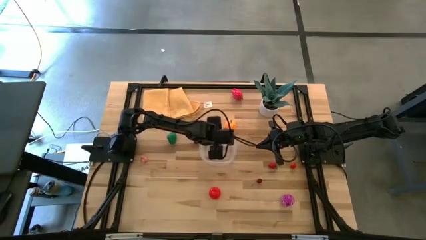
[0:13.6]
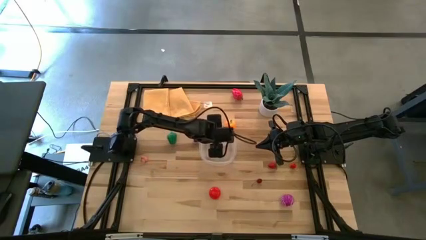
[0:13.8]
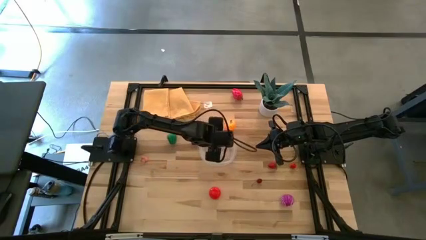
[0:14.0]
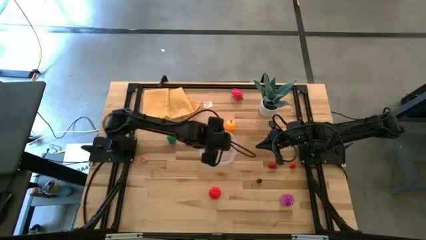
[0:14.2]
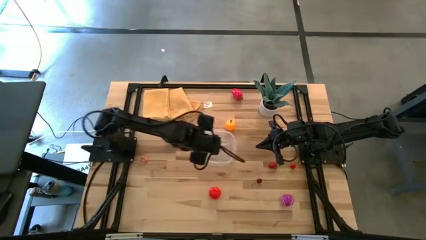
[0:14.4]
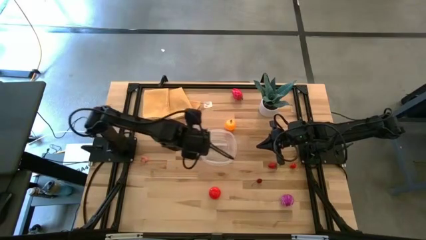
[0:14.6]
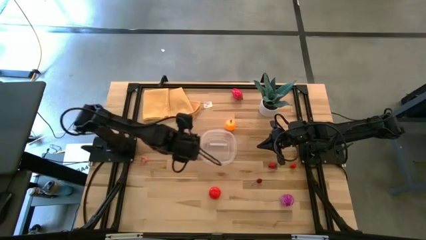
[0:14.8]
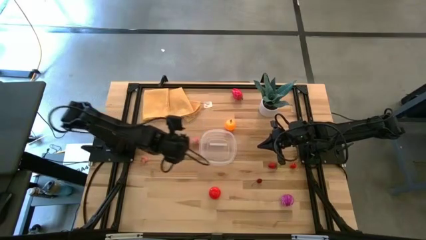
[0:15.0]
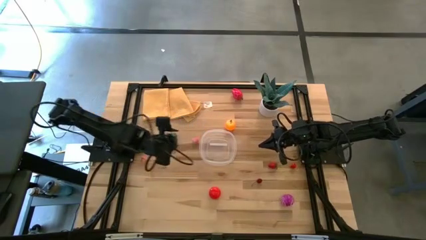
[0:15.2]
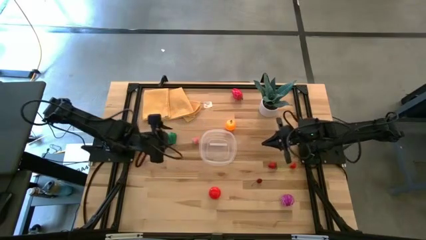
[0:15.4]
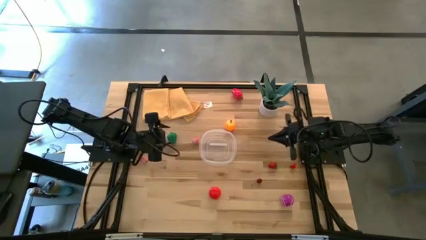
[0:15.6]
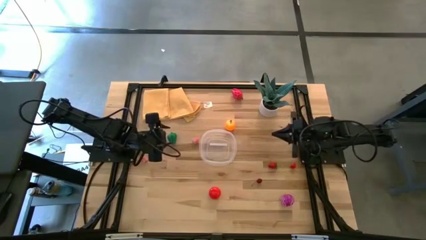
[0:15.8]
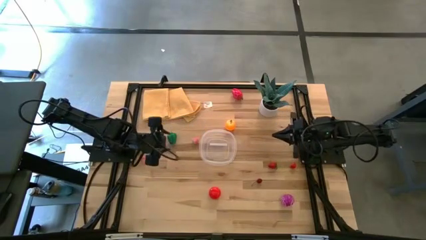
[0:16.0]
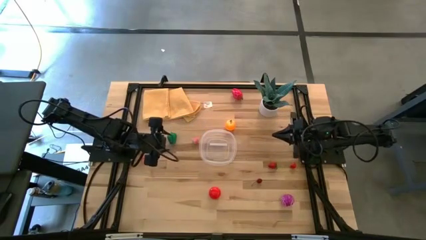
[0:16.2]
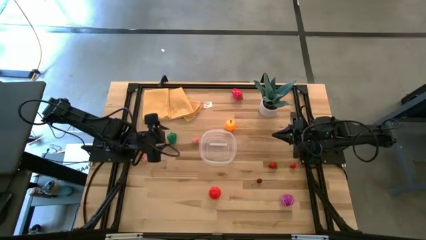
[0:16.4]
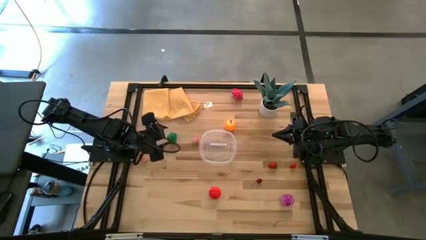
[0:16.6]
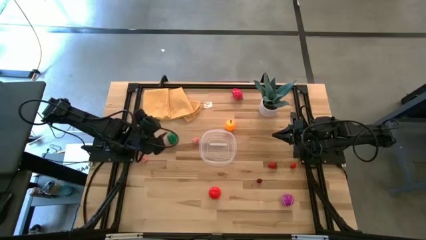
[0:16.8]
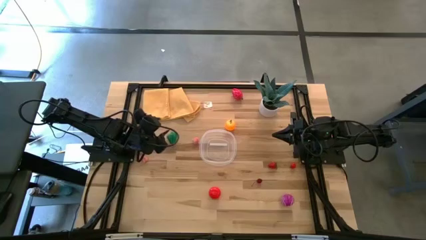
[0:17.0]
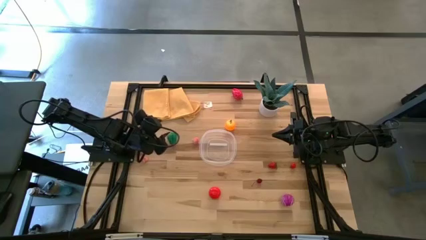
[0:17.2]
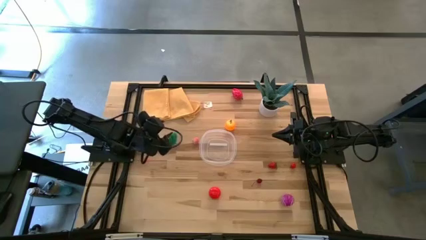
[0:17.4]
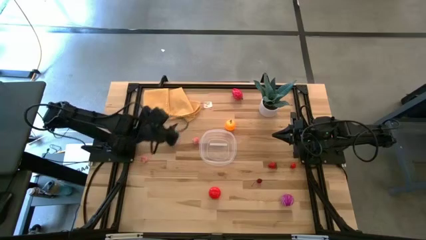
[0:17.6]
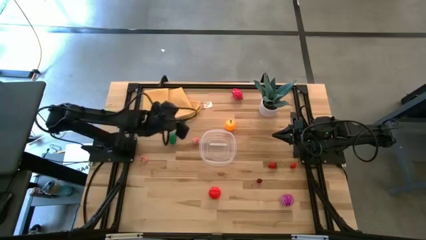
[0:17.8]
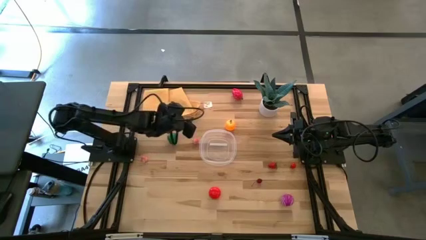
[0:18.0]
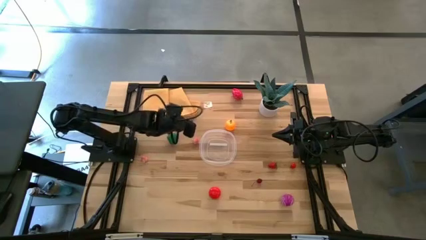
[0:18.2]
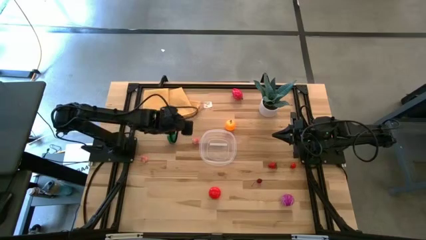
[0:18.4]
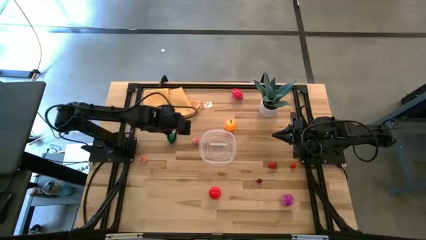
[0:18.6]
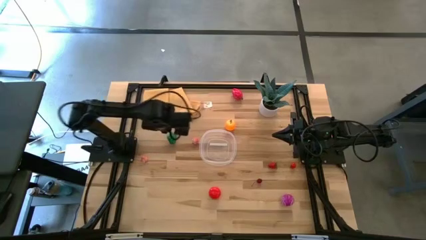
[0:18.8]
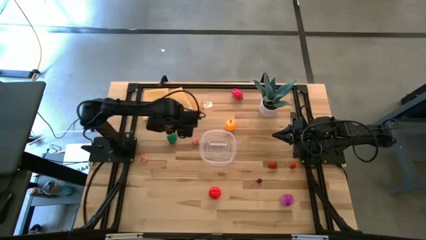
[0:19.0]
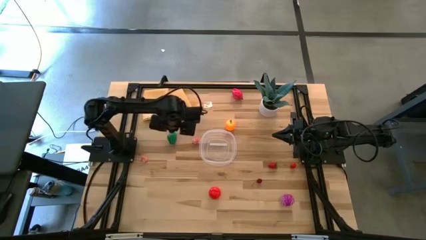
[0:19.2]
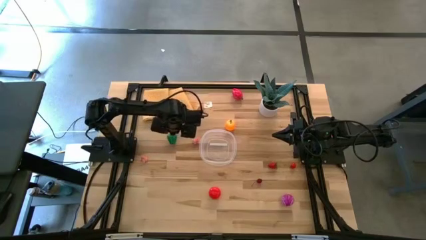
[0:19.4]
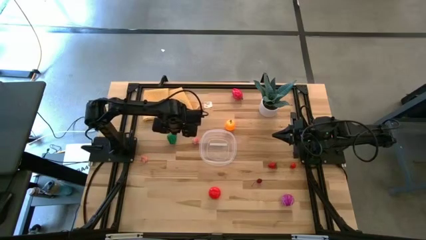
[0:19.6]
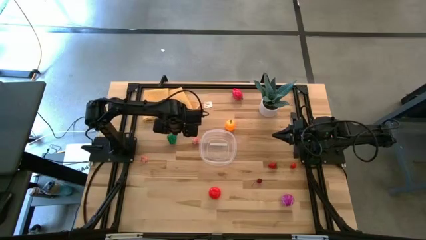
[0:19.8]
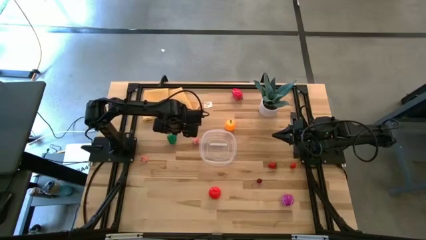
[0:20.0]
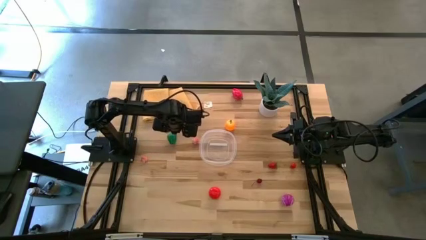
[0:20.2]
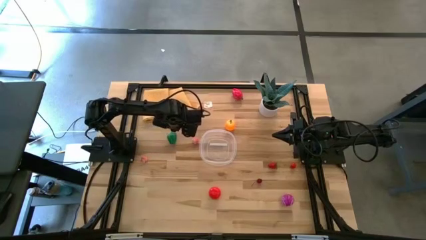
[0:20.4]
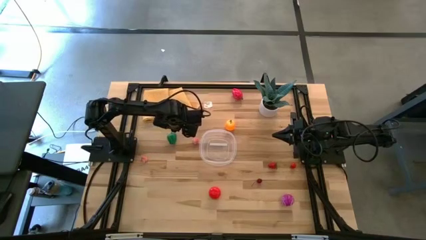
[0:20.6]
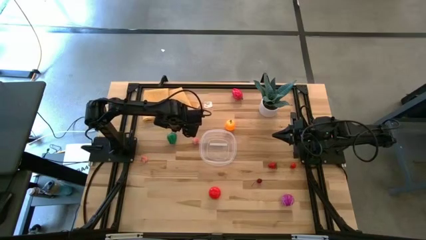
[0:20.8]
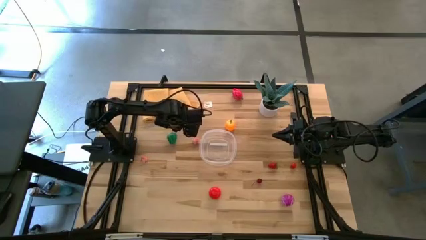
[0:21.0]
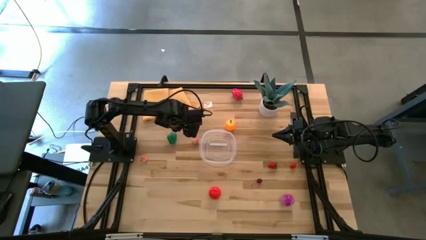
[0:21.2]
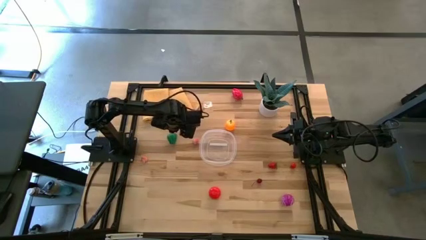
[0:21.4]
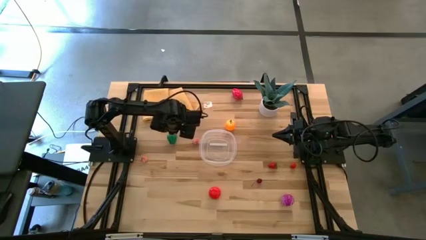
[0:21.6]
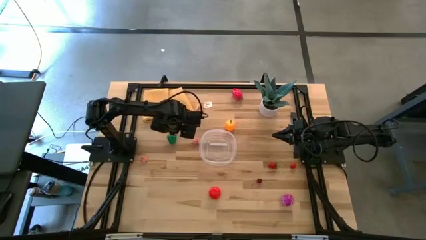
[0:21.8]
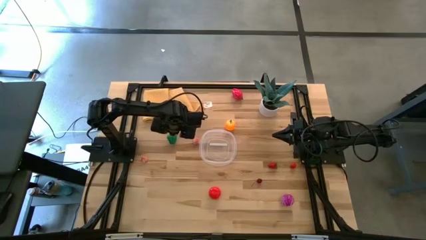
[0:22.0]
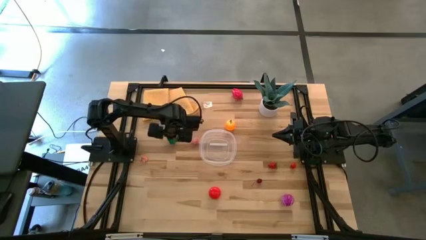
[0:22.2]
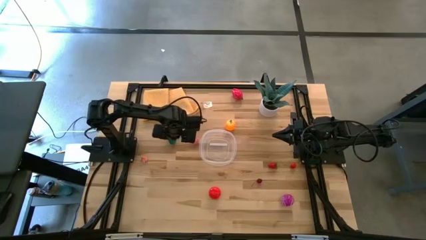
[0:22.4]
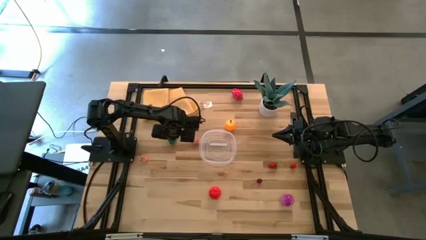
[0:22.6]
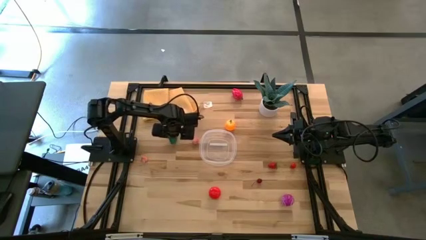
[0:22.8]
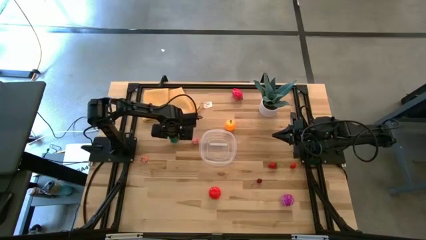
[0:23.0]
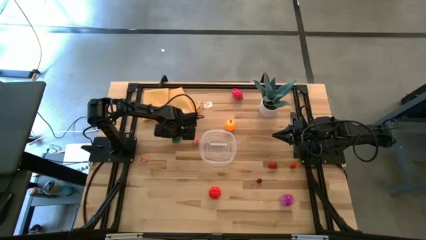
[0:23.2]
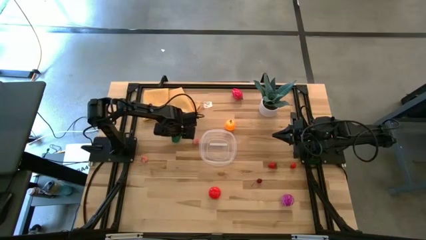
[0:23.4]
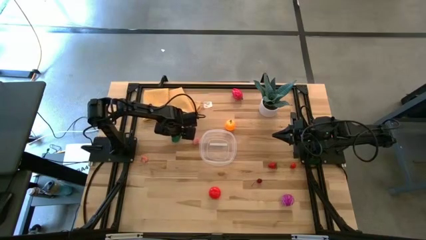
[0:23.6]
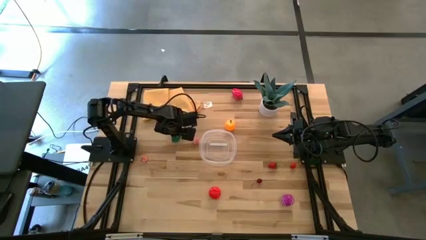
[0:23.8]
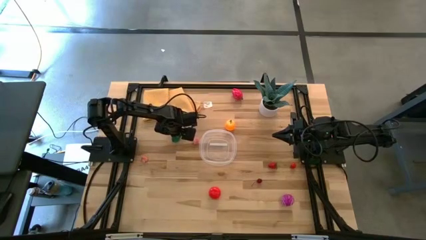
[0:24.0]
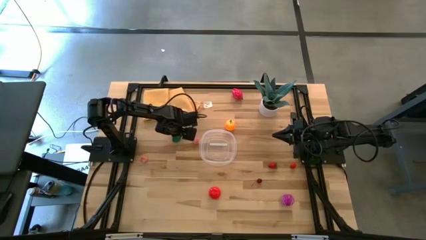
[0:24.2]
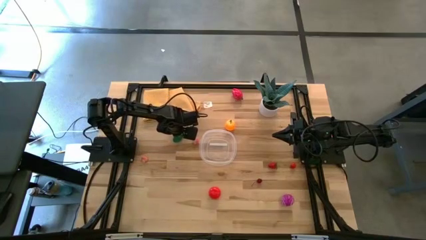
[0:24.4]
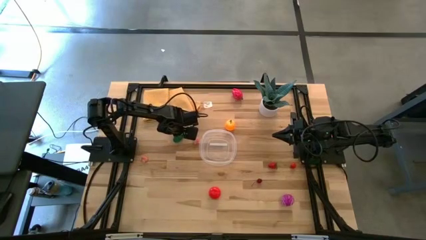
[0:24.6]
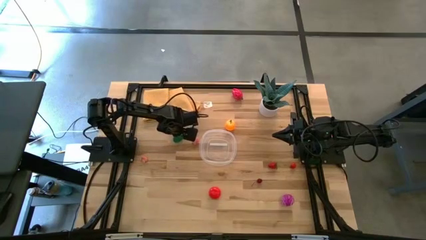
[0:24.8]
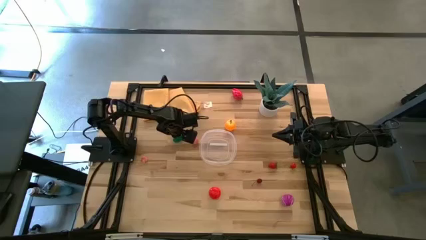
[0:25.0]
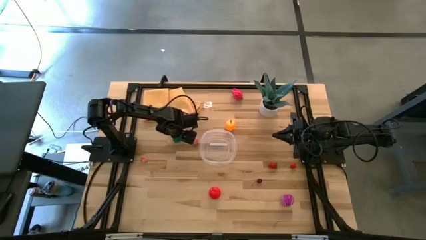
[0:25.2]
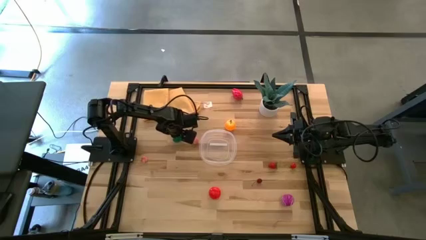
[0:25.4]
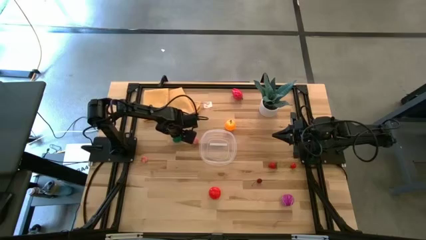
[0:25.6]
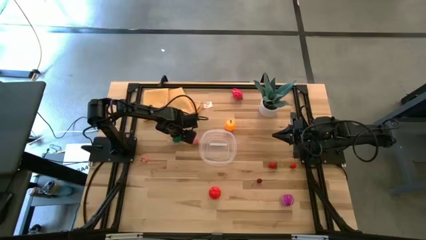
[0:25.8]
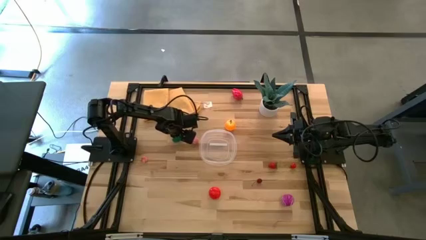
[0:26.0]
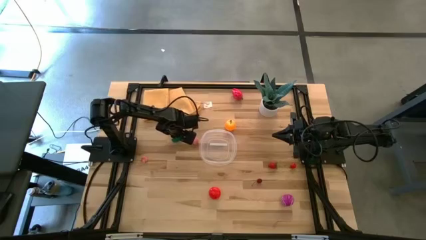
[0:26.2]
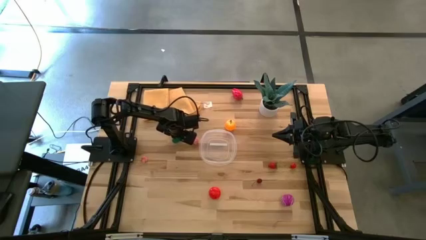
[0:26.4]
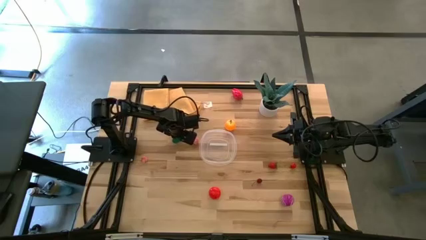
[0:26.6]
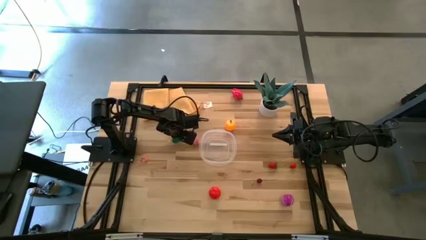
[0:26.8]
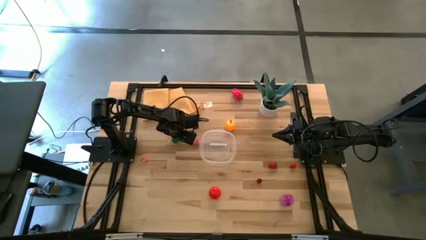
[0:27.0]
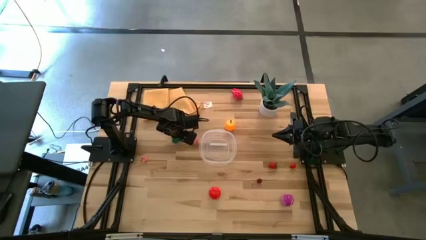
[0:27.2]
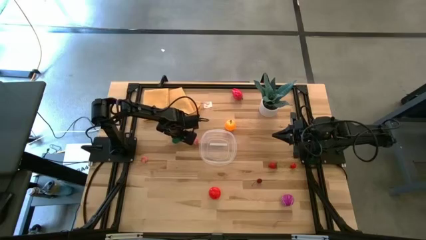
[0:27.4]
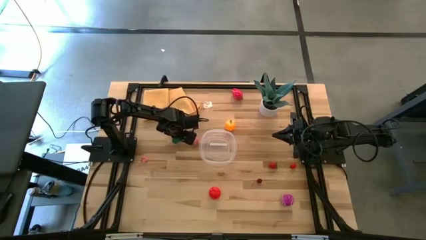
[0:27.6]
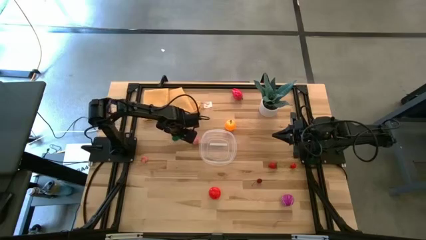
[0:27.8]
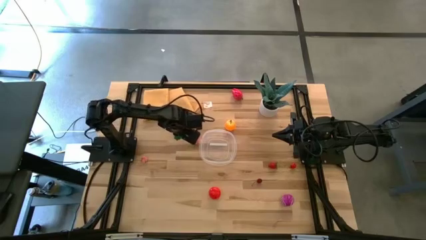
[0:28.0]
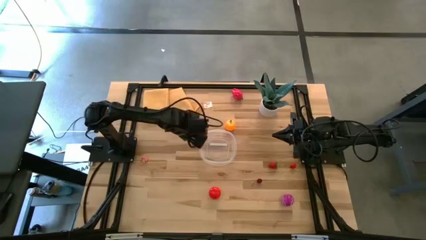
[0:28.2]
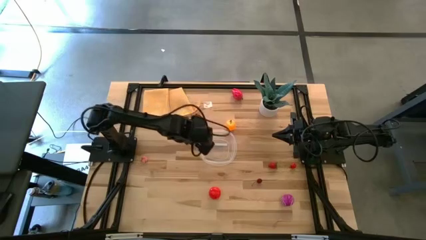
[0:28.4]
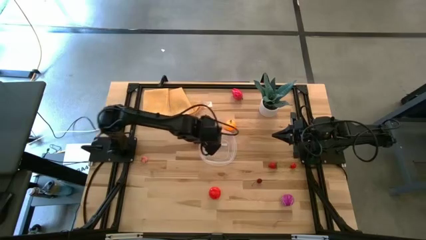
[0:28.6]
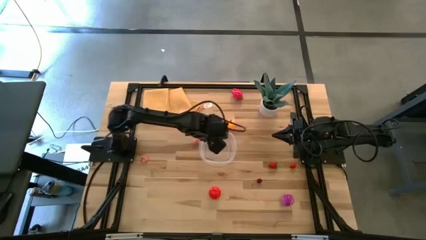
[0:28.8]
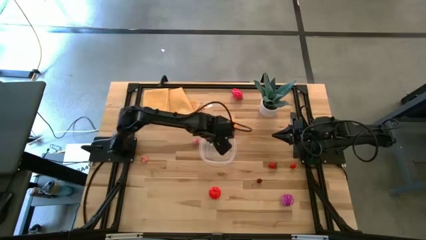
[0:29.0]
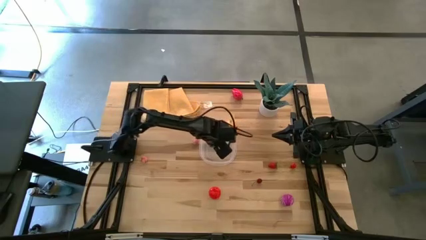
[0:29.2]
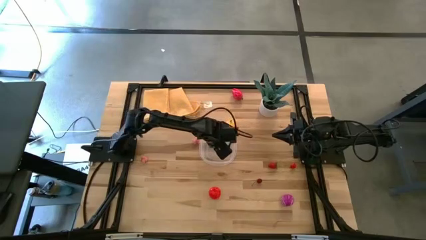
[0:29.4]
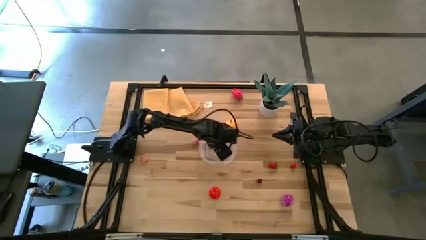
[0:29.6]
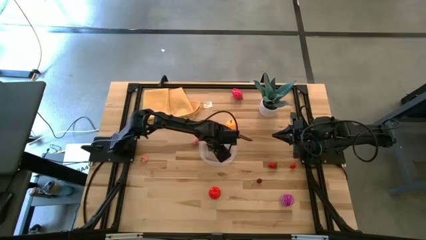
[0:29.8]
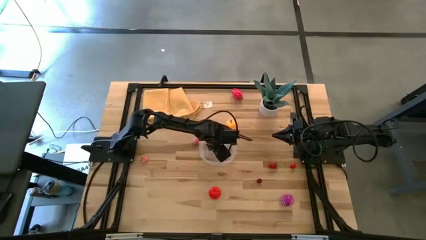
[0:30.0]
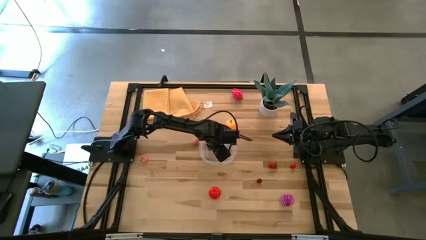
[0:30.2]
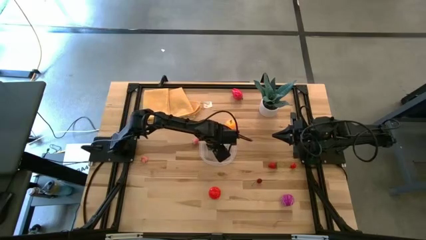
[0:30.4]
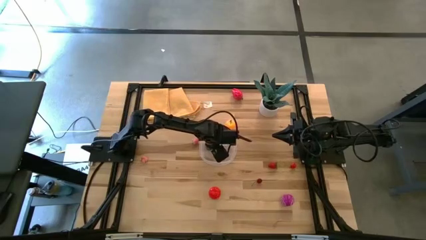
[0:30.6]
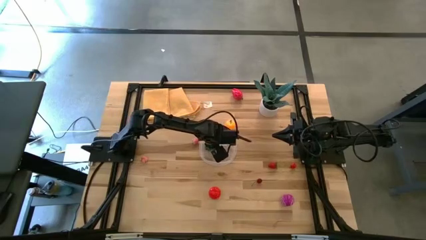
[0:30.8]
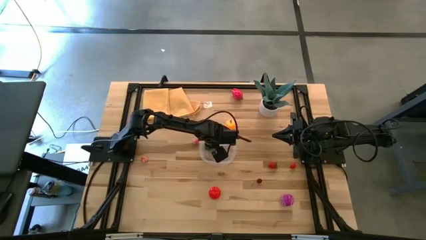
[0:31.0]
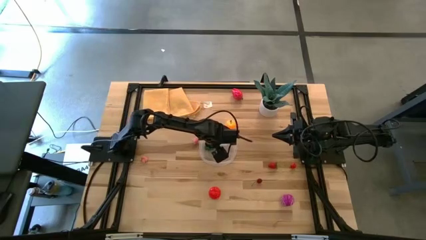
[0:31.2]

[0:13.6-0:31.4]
Task: Pick and placing Produce into tupperware
Put the green bell pepper into the transparent bin
